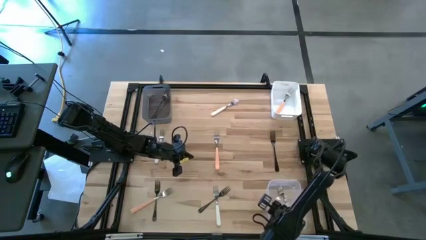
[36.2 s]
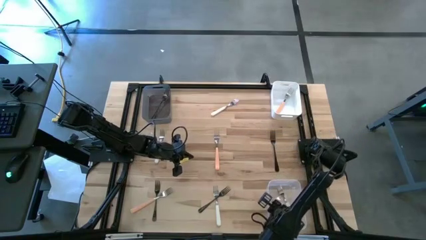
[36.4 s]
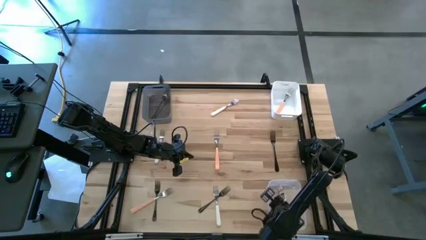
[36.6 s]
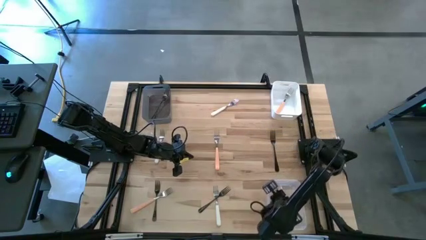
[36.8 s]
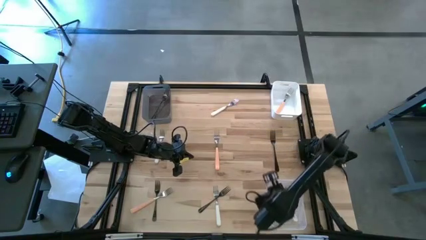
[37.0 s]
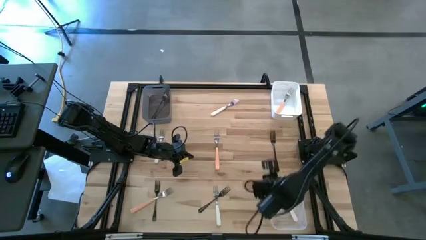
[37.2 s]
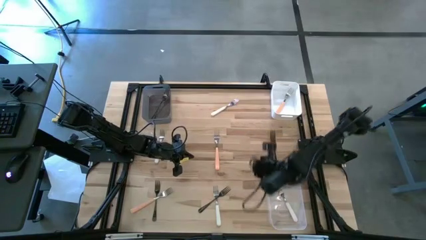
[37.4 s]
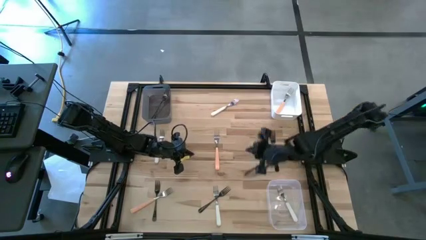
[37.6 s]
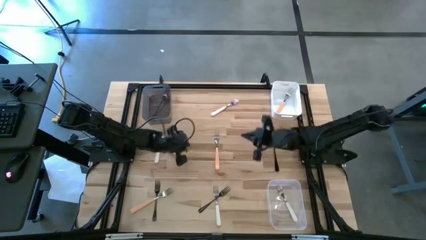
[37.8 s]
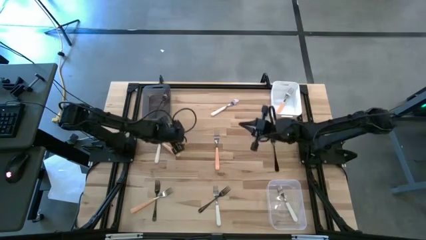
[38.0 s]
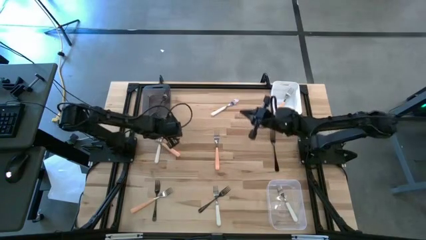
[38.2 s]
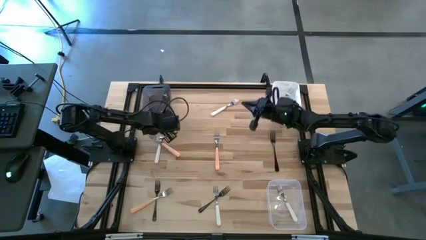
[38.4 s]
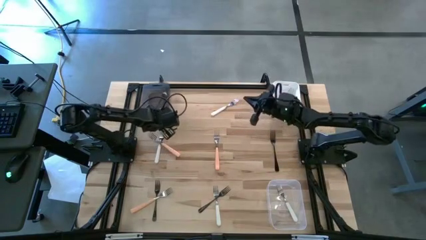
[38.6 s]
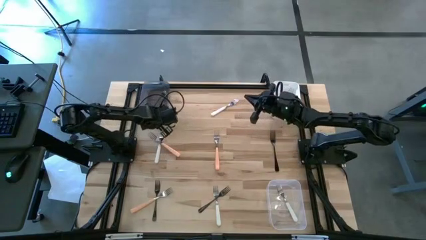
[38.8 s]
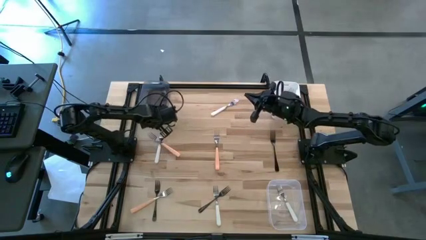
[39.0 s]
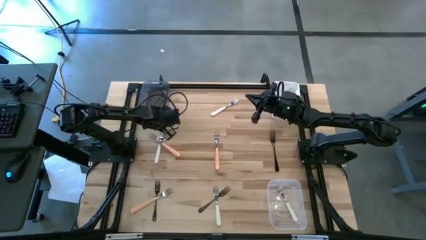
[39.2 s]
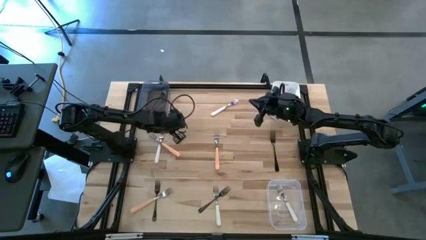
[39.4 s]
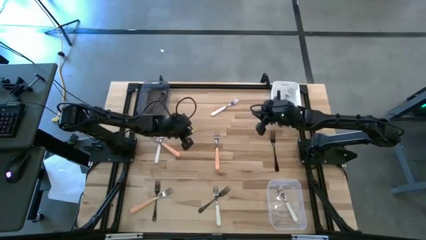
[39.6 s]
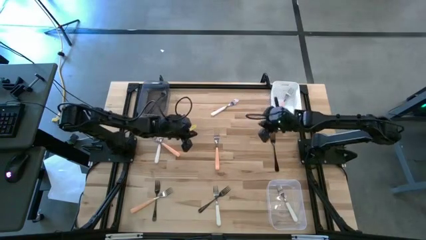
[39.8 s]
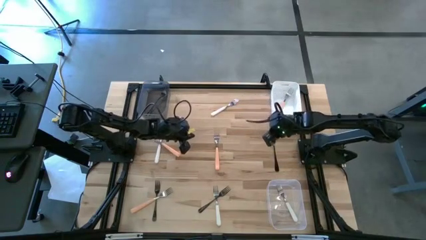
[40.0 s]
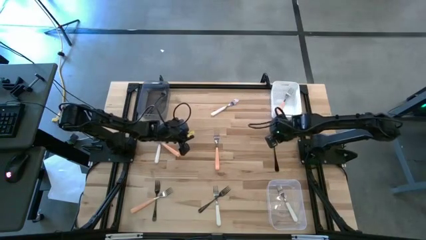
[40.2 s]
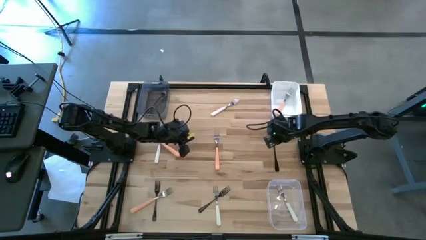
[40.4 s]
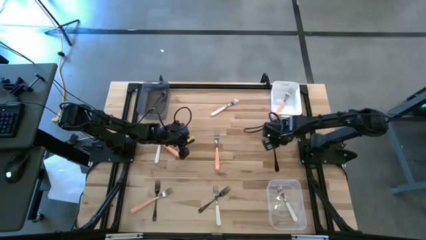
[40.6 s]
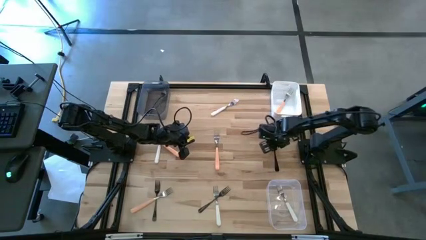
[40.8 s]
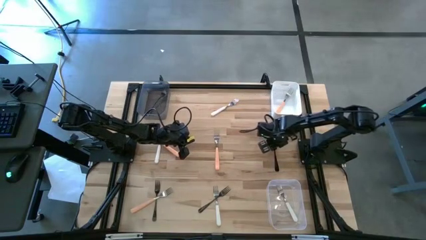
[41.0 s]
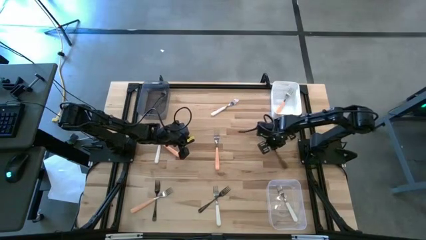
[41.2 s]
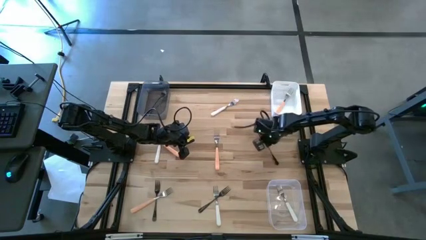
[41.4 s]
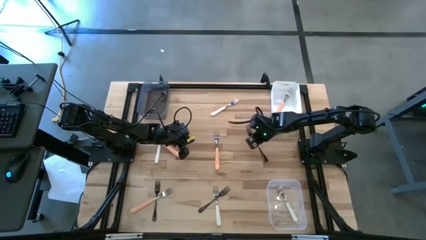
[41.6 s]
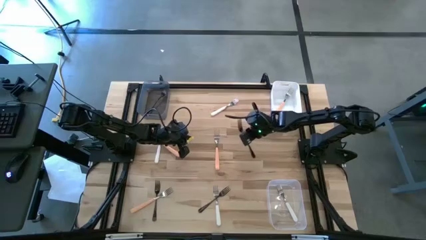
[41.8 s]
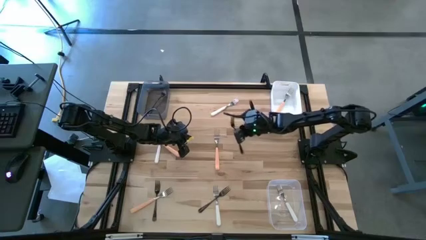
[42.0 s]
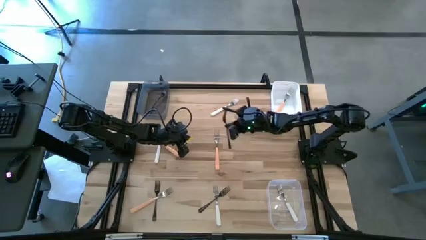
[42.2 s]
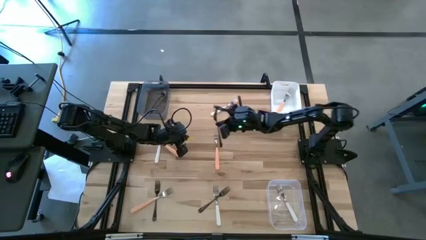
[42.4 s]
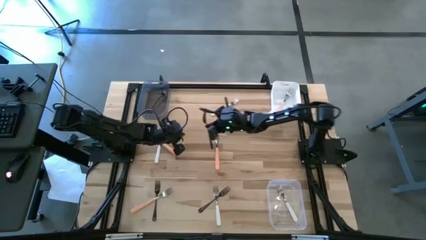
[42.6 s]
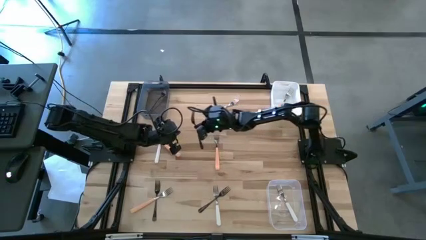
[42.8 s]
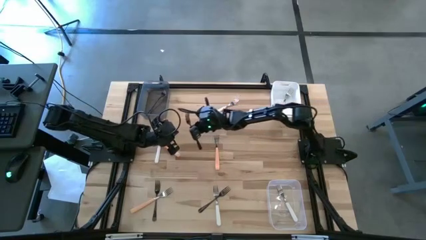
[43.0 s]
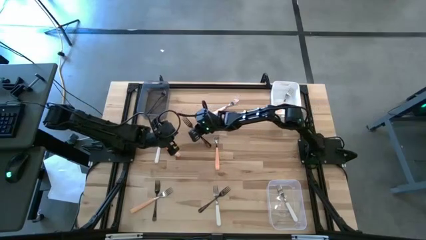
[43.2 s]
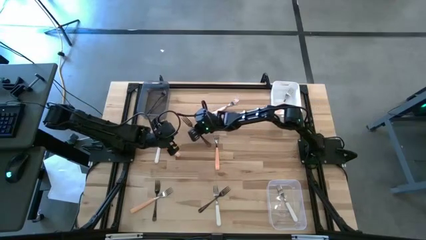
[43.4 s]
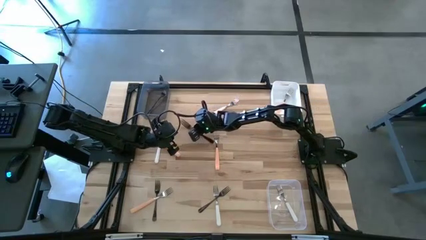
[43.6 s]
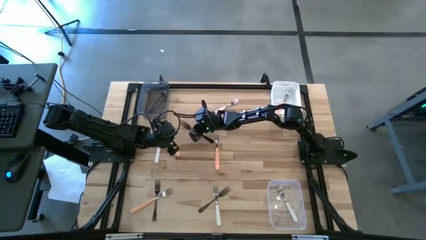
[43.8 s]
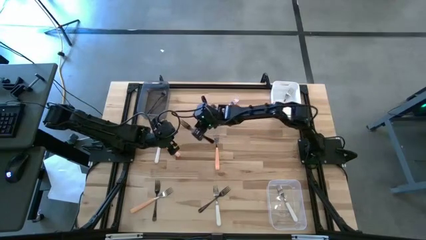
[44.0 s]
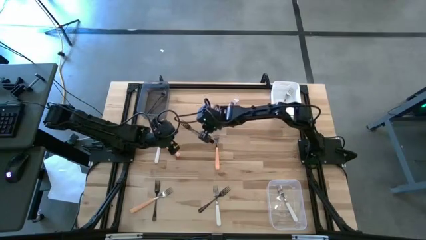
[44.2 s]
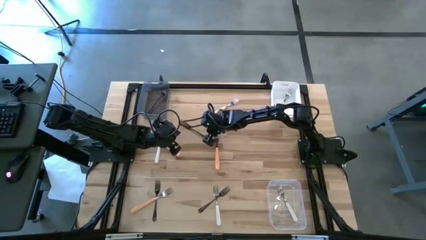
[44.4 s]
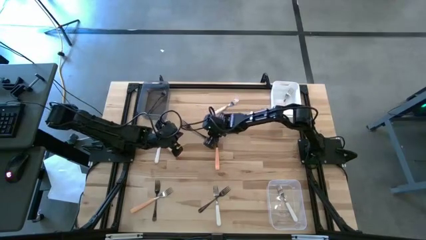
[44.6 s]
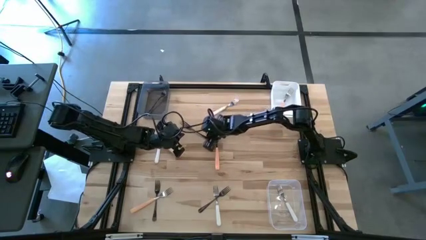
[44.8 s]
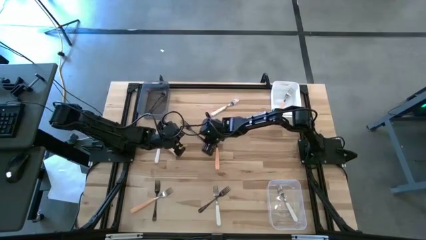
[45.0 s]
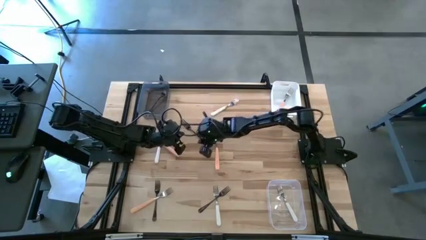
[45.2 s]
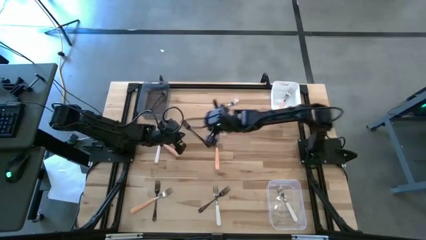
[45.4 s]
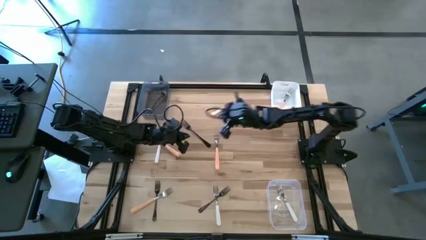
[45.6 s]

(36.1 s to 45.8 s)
Task: Sort silverware by color (type)
Put the top black fork into the black bin

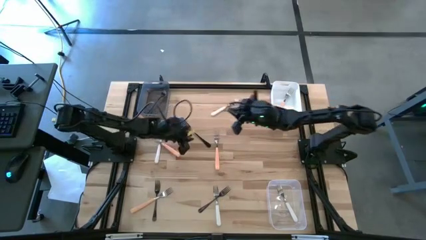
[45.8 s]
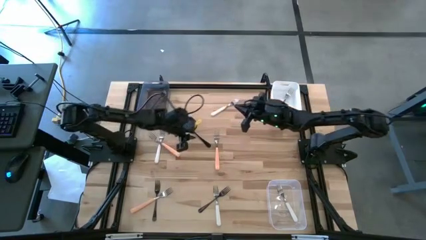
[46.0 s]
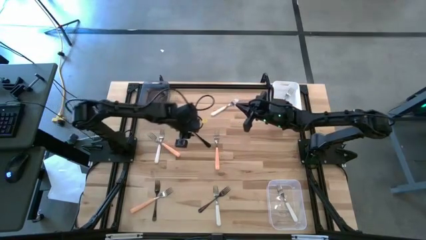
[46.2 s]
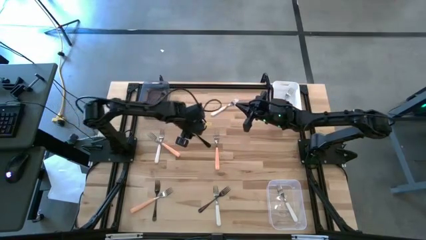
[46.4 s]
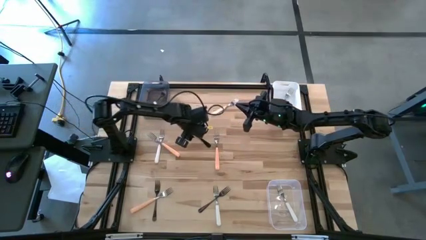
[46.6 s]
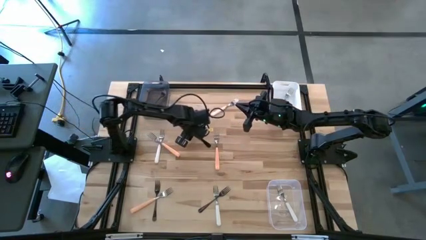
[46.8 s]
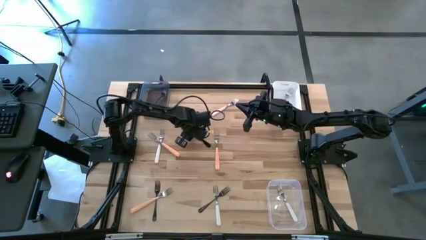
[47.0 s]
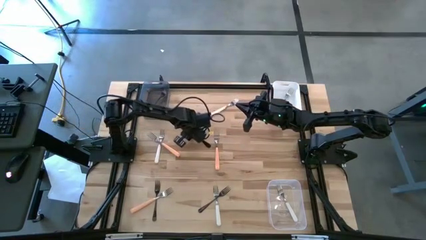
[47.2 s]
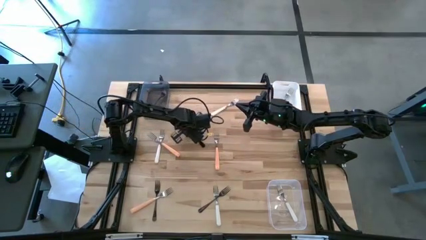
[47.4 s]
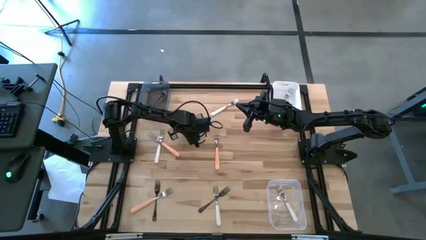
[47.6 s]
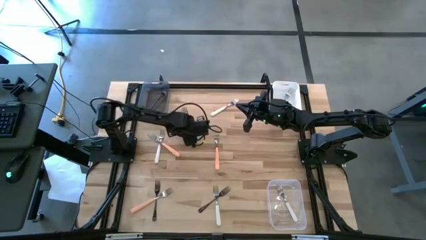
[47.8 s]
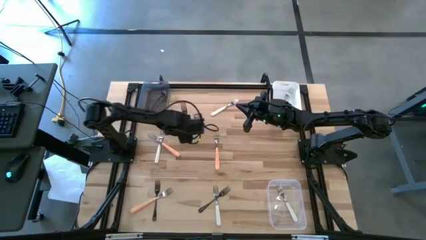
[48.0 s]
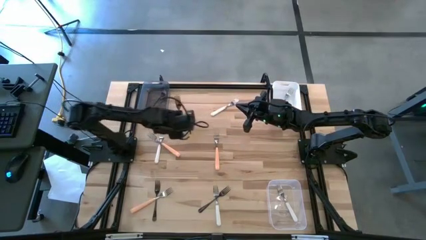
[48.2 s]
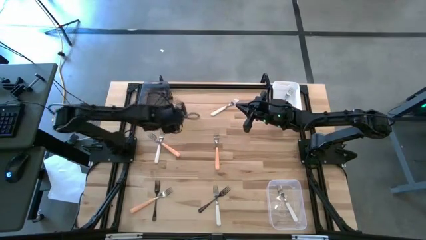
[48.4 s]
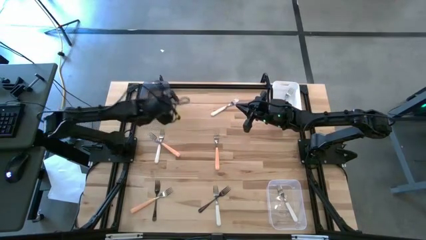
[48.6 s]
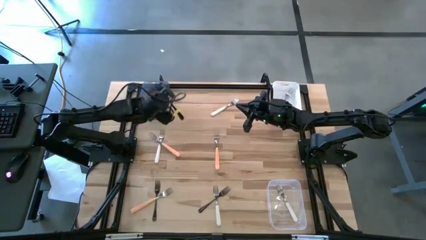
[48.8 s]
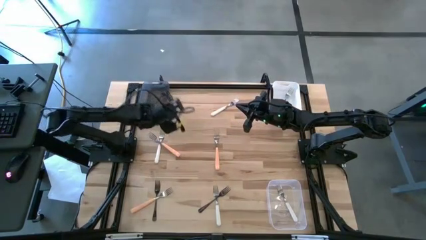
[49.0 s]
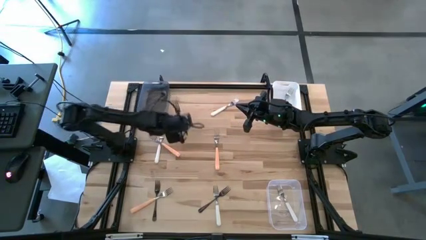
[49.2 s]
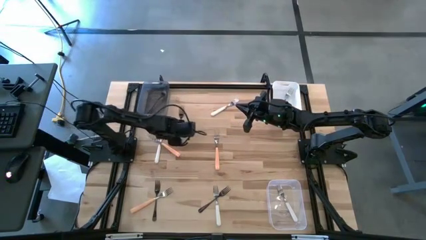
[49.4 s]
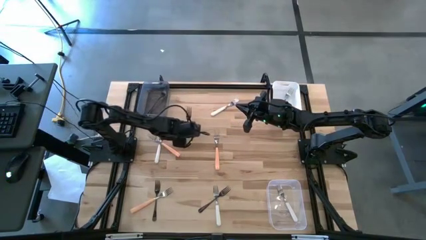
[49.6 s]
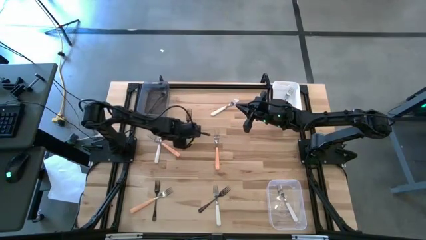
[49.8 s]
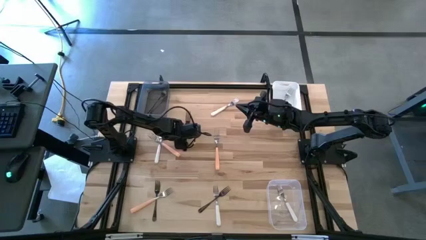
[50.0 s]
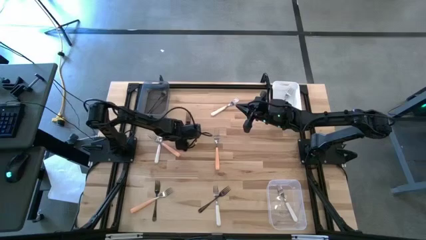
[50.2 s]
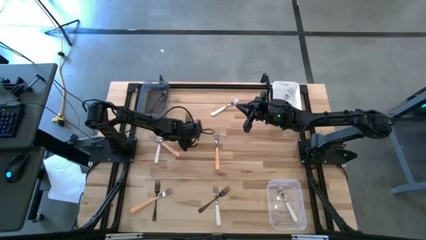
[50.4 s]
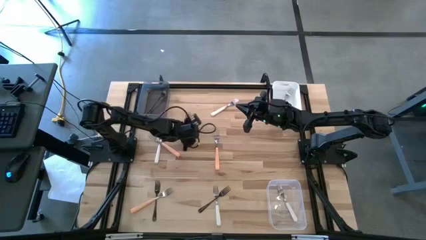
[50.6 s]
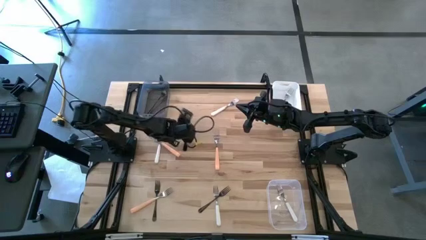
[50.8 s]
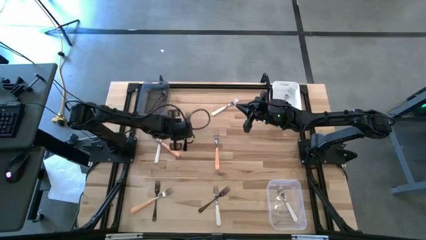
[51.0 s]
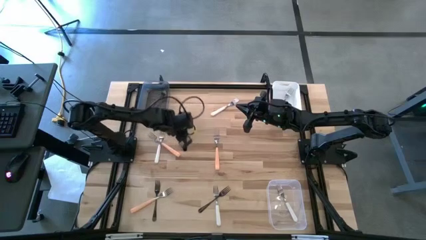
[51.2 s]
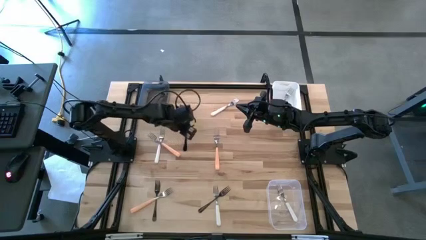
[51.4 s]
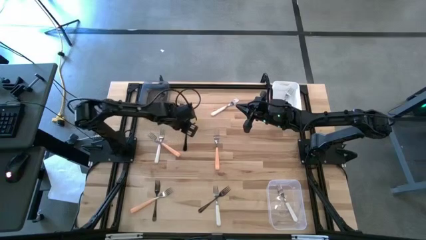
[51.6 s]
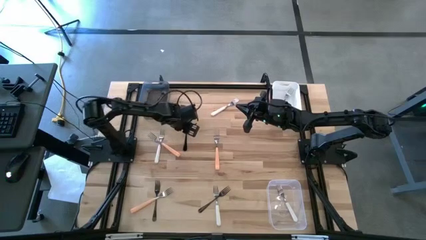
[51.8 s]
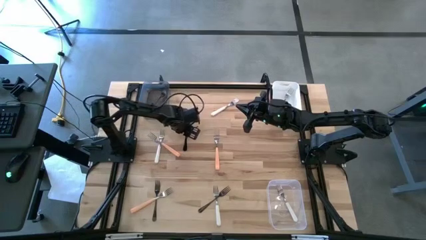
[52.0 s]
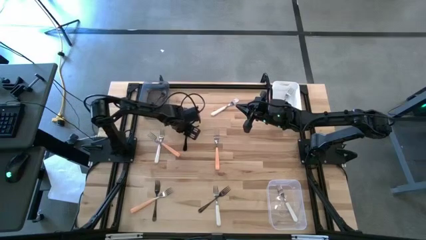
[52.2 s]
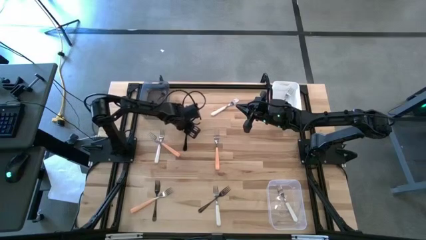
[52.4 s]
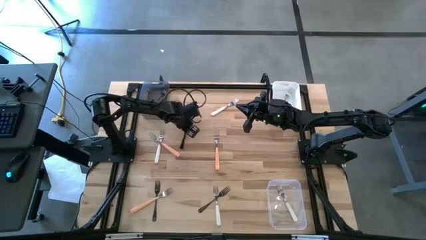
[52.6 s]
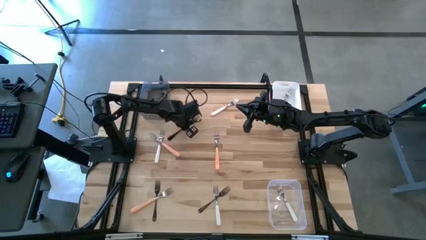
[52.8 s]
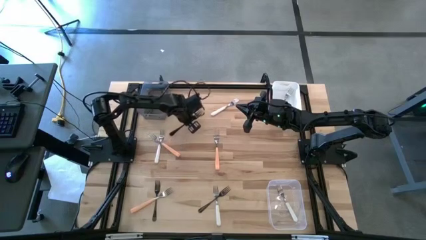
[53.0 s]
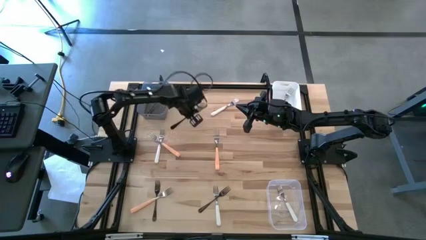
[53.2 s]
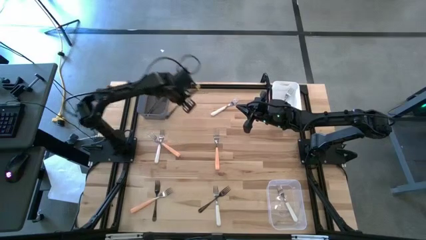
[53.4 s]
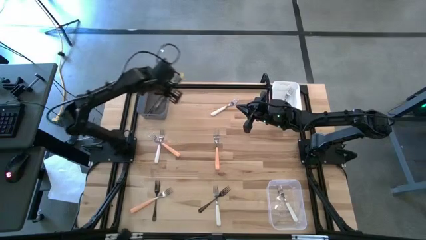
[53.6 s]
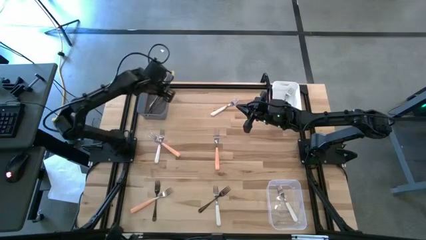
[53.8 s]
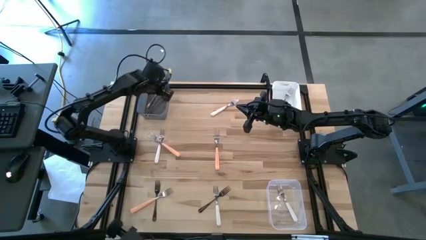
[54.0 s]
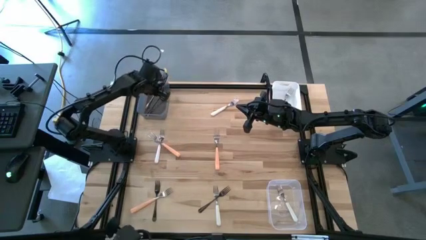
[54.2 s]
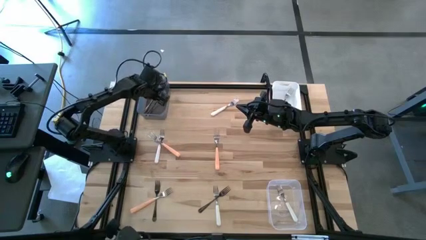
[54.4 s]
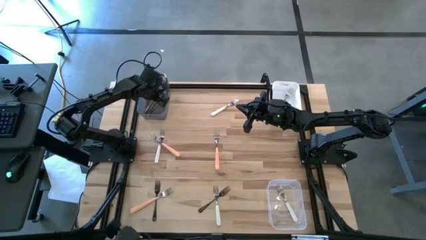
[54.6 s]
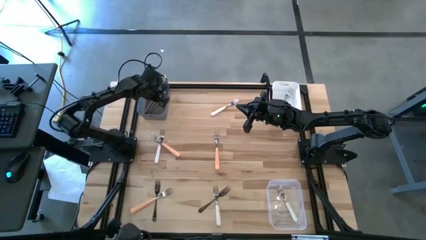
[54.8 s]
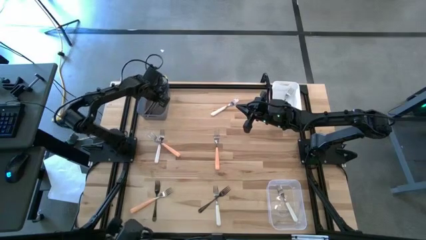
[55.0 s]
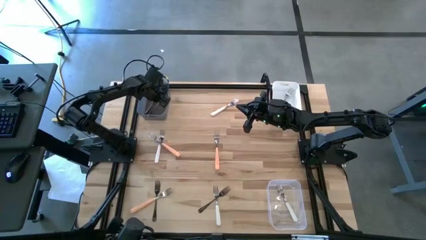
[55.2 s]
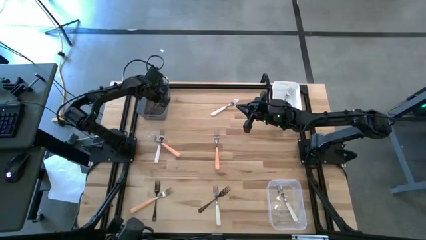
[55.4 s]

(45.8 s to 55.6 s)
Put the top black fork into the black bin
